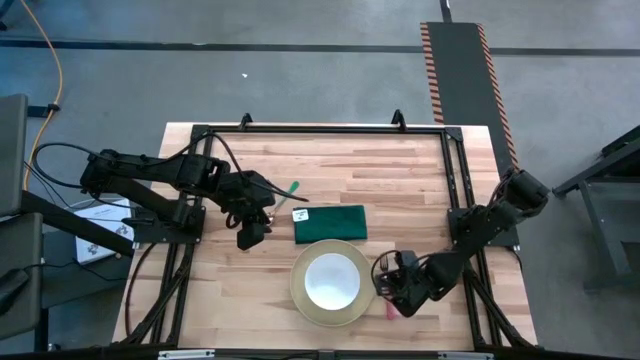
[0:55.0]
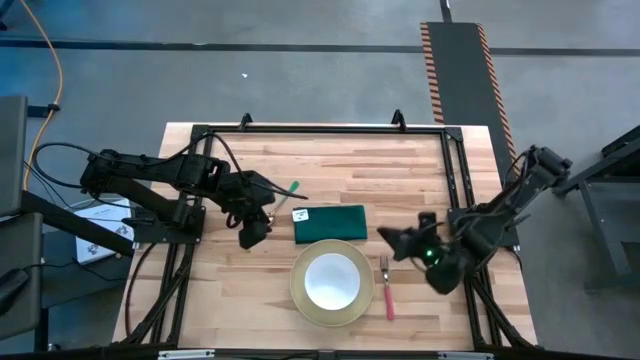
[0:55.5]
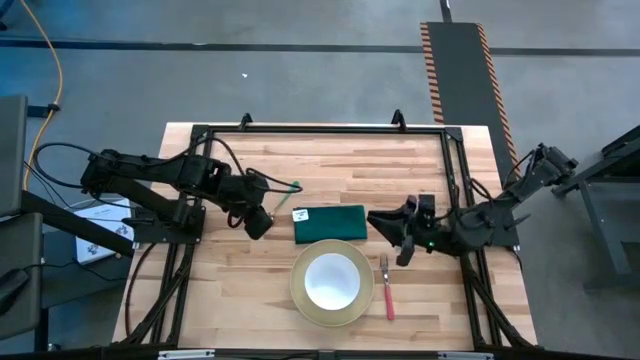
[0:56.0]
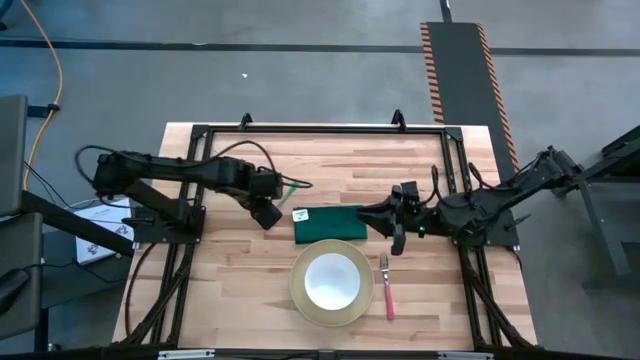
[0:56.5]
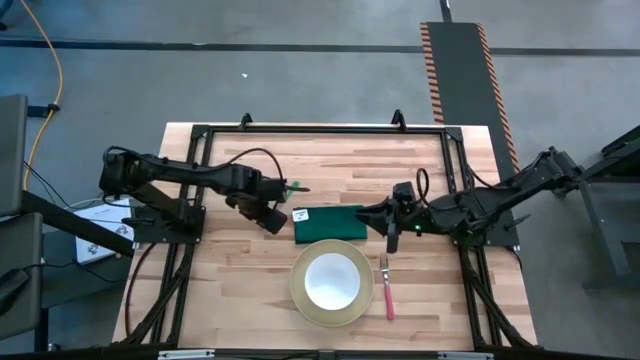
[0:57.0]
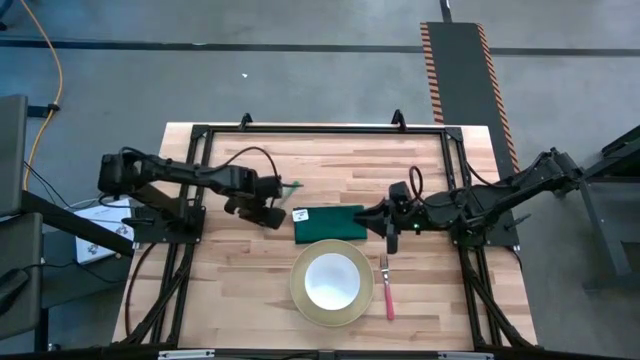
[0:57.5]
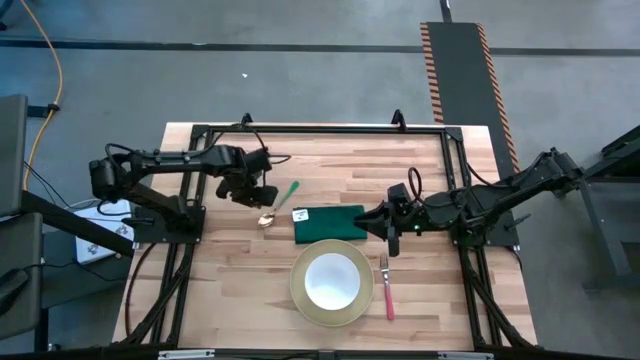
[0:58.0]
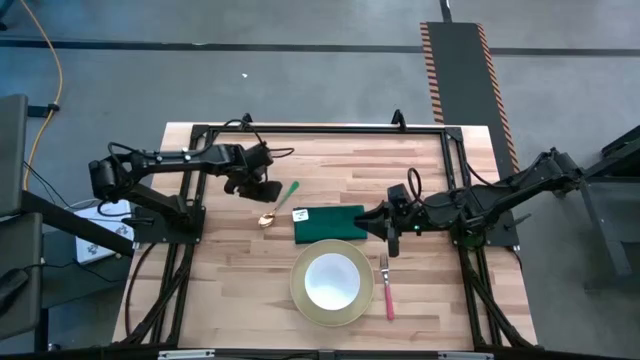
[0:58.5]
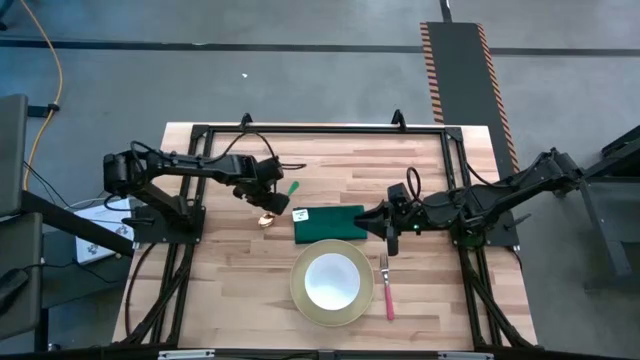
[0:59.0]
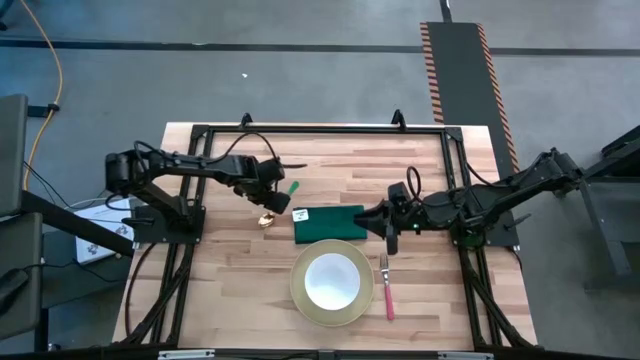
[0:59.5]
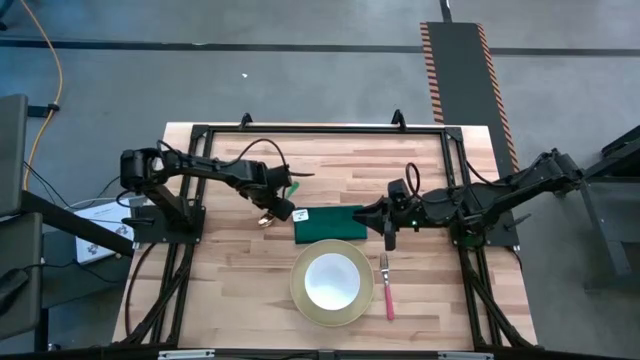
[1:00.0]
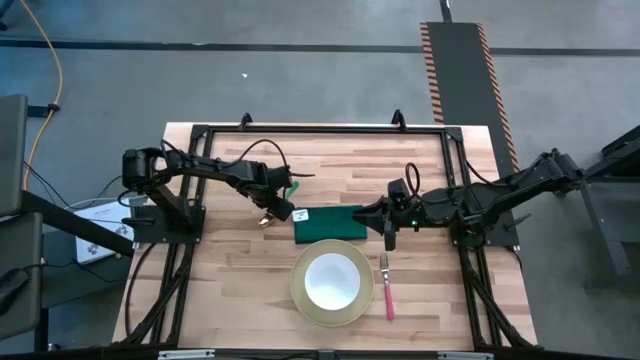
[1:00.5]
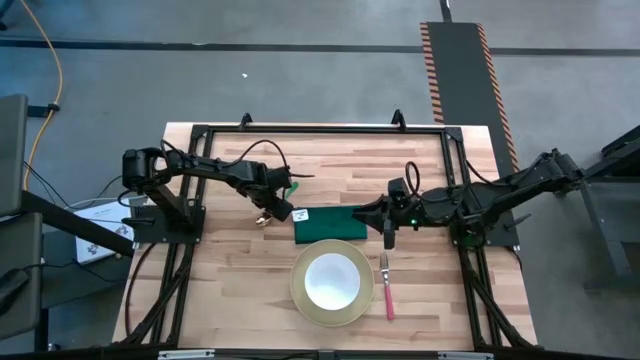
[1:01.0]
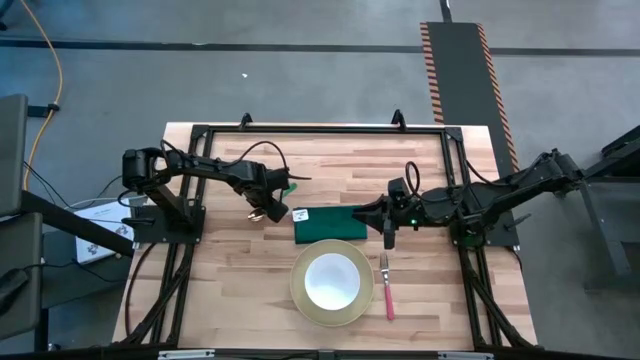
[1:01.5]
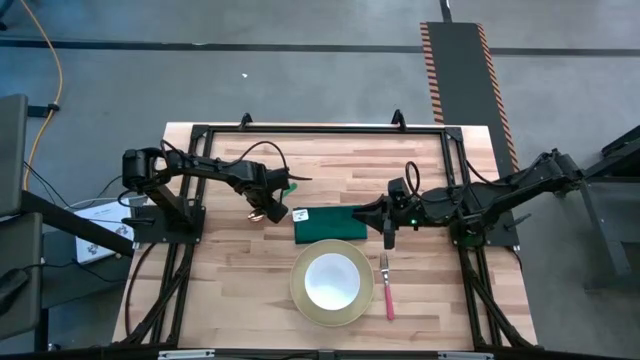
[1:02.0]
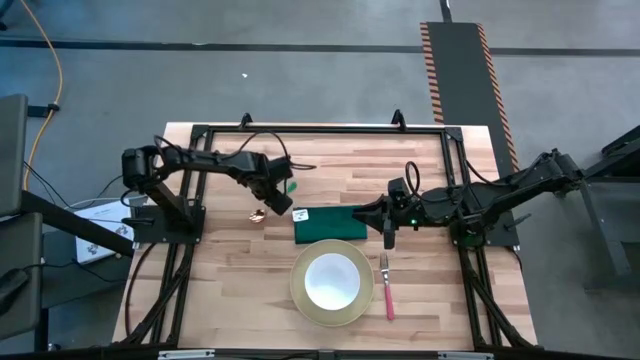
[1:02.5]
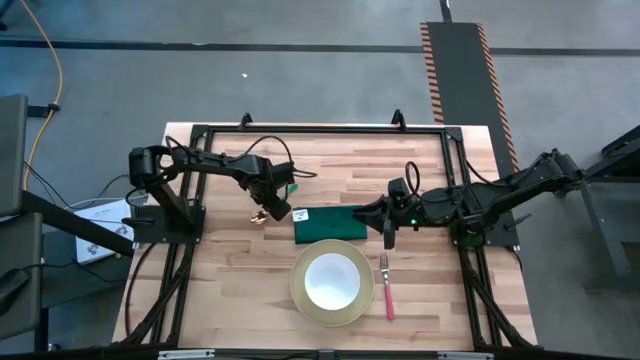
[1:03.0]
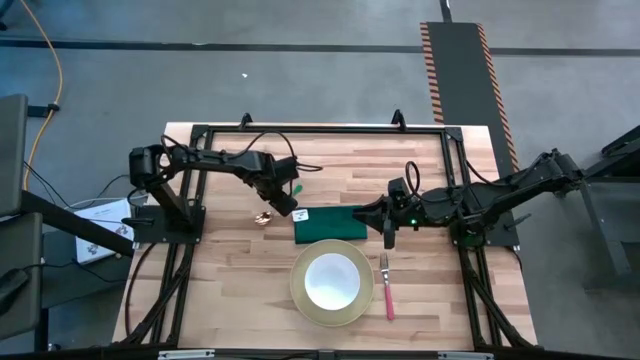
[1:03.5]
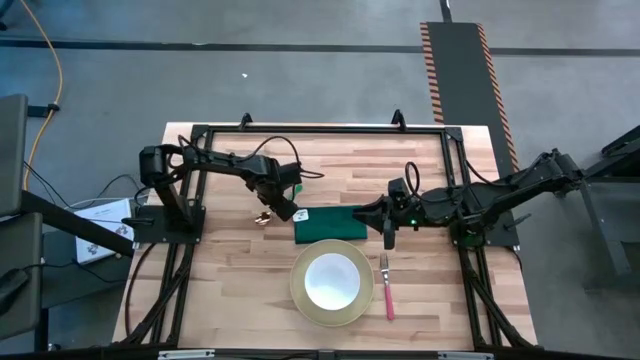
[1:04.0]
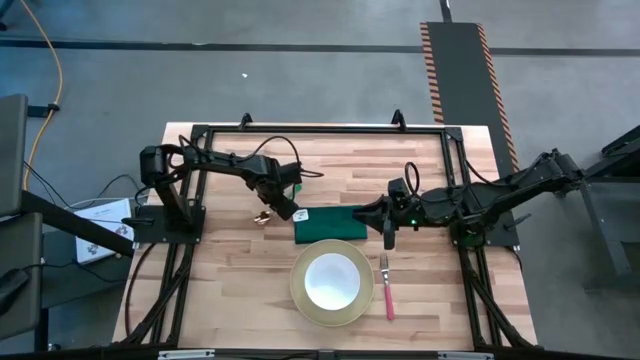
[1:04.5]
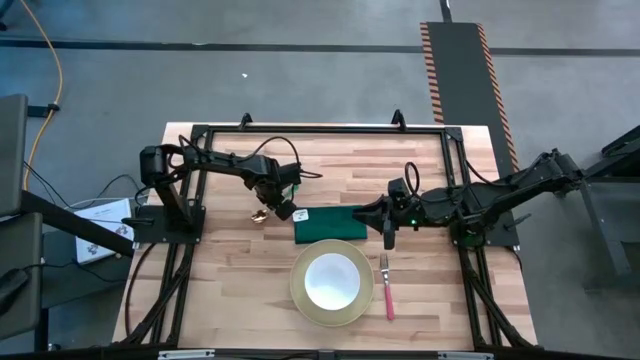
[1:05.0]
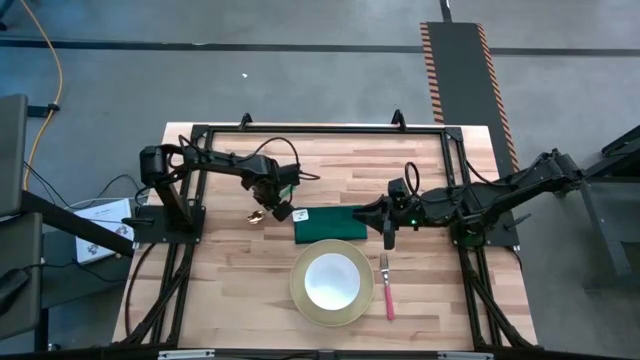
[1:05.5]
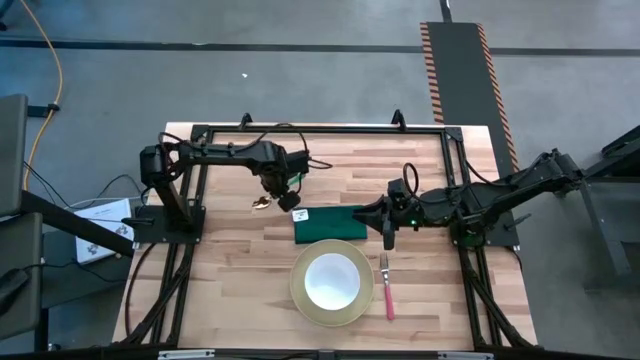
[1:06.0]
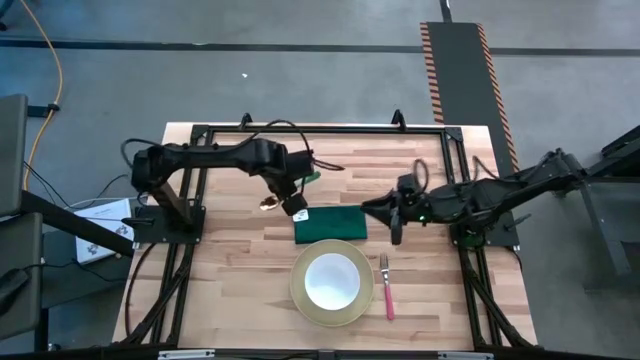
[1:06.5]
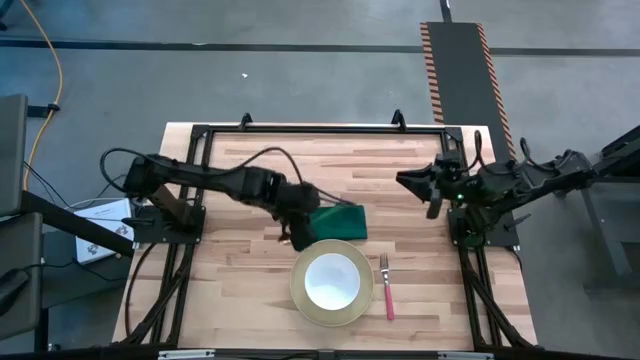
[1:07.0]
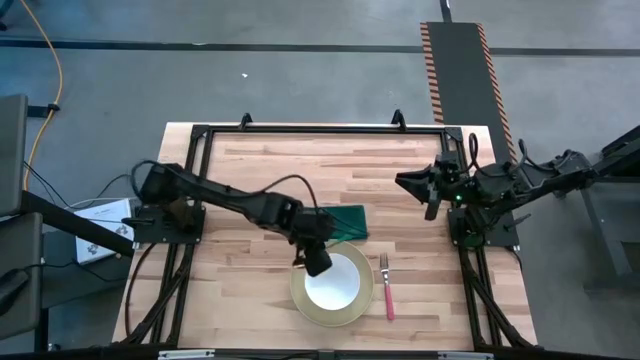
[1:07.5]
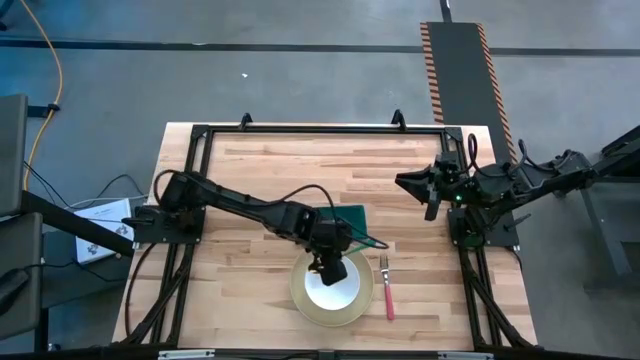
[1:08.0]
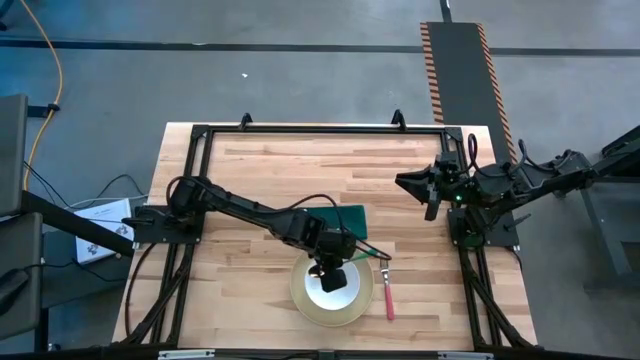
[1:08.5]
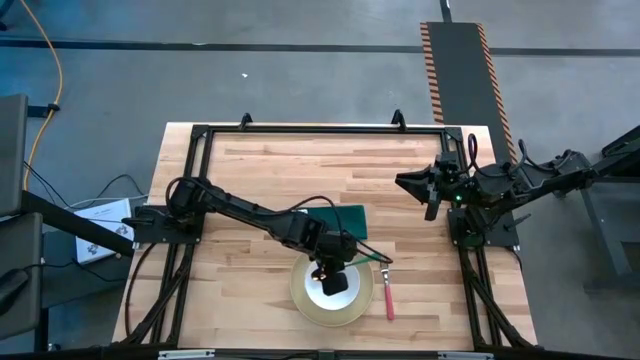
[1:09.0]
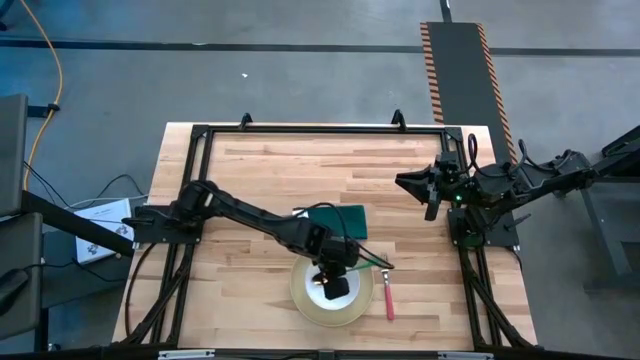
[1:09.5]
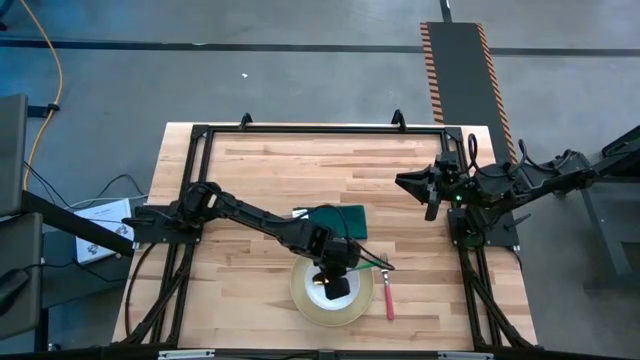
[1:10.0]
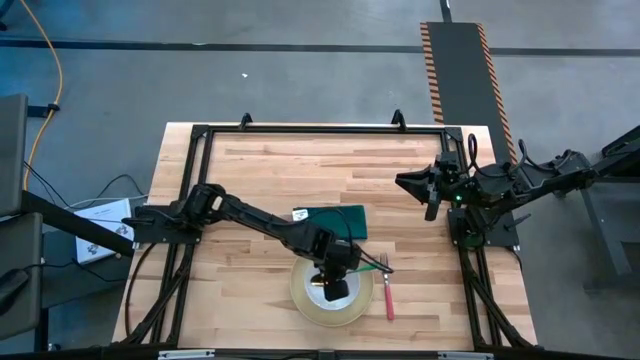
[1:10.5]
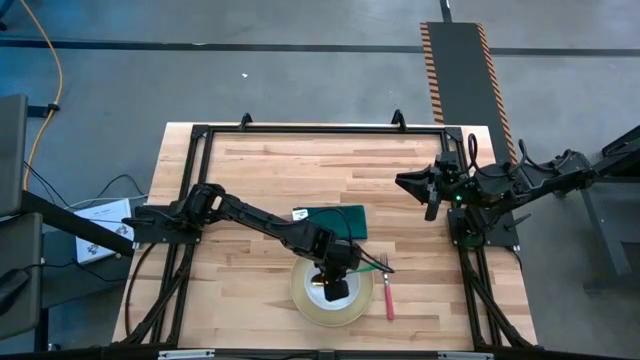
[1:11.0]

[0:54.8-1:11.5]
Task: Set table place
Put the green spoon into the white bowl

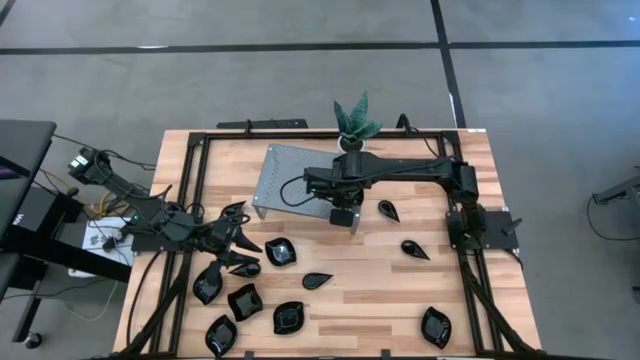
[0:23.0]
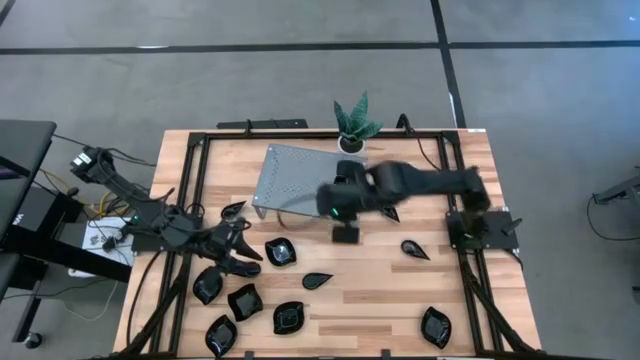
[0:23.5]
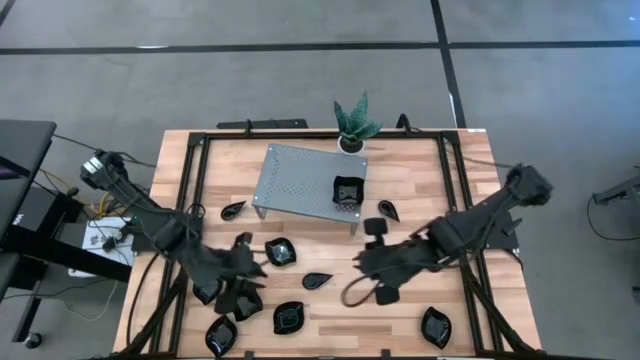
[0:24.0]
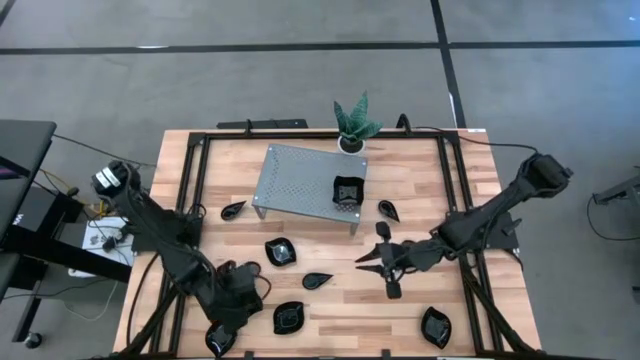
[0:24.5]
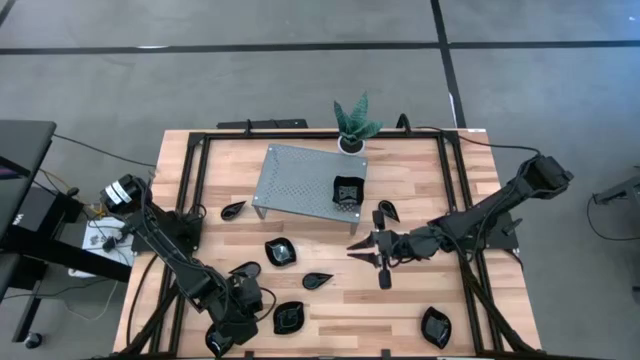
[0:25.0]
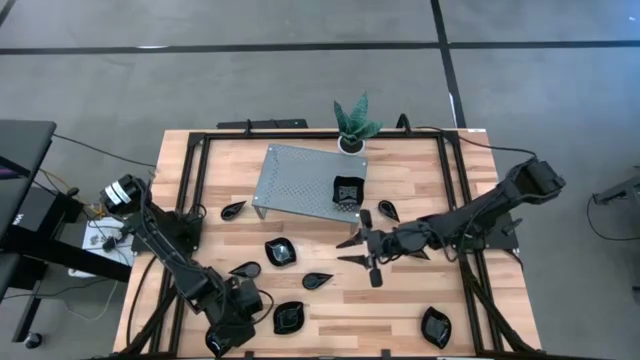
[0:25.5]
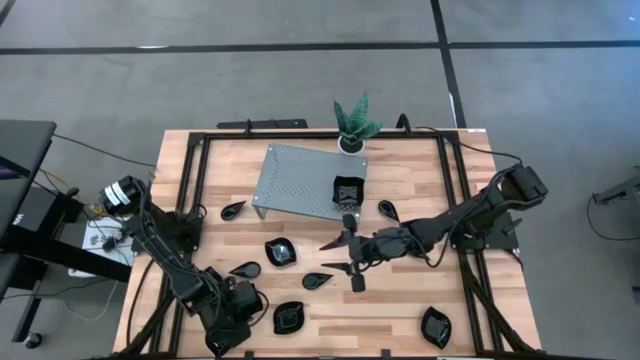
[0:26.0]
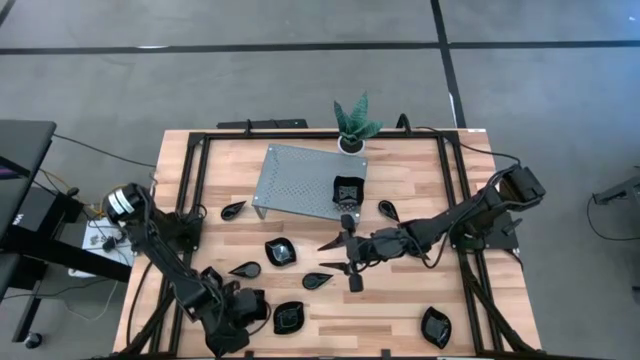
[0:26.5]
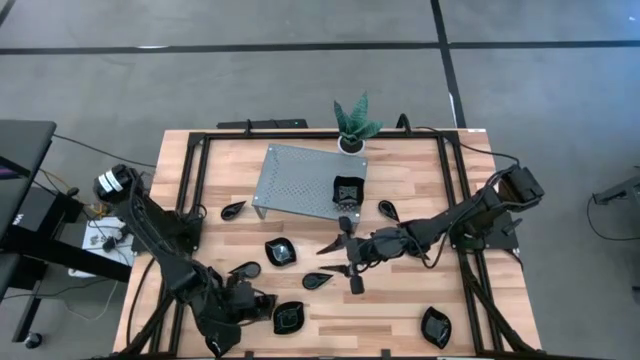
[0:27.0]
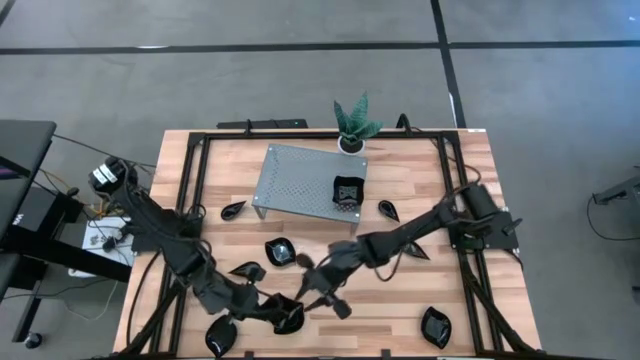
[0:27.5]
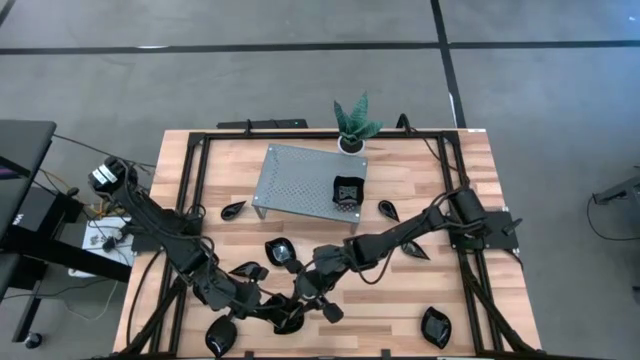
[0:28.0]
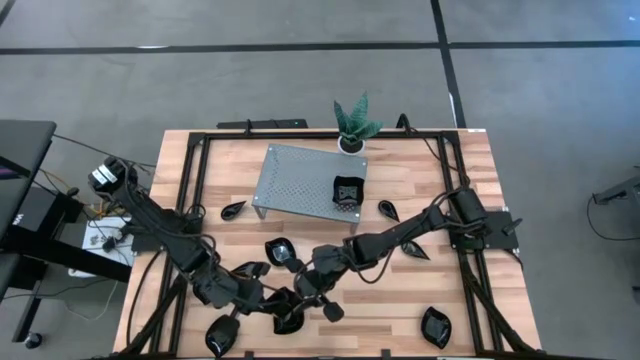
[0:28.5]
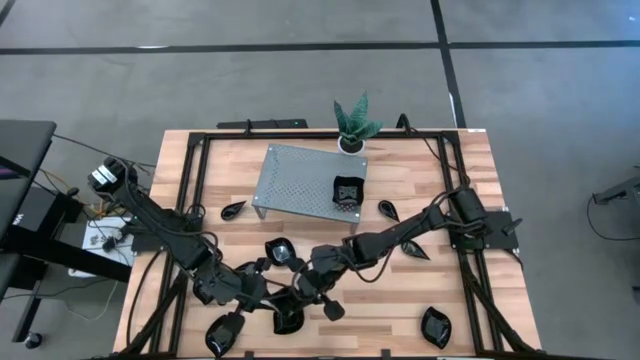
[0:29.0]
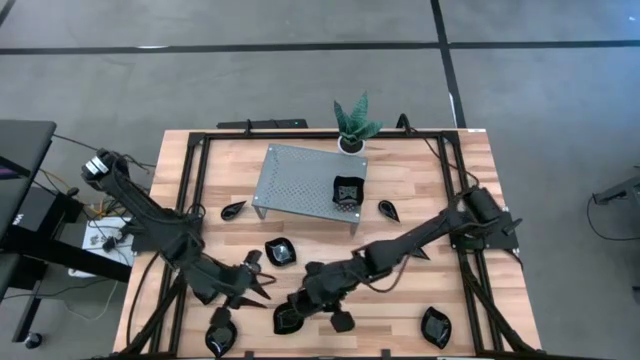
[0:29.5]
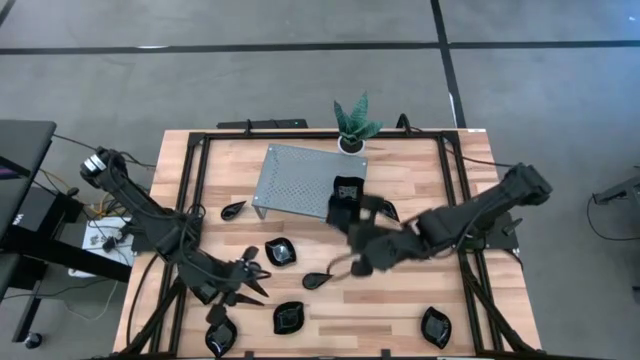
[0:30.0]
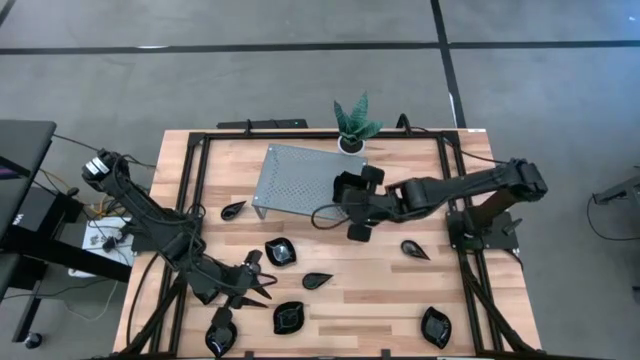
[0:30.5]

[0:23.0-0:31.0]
Task: Pick & Place Mini shaped plates
Stack the distorted square plate on top of the distorted square plates on the shelf
